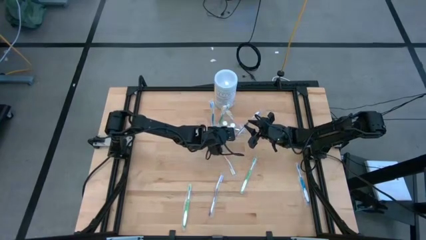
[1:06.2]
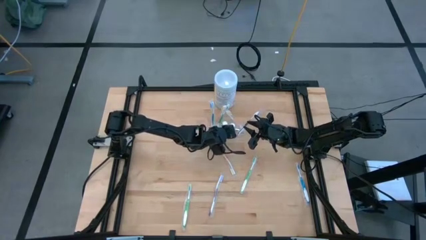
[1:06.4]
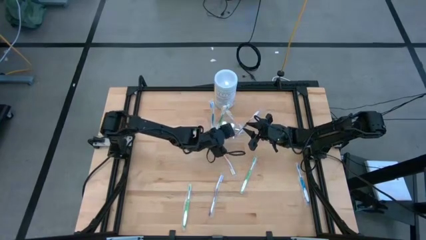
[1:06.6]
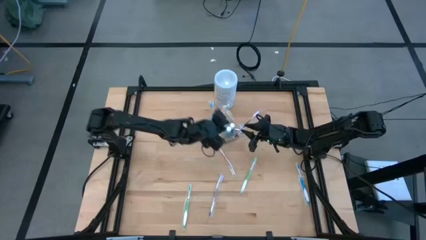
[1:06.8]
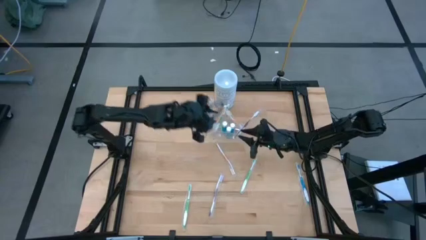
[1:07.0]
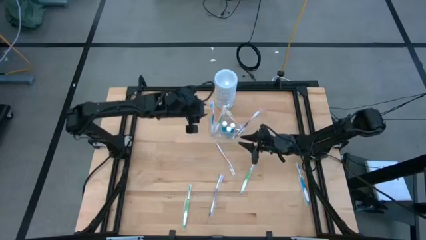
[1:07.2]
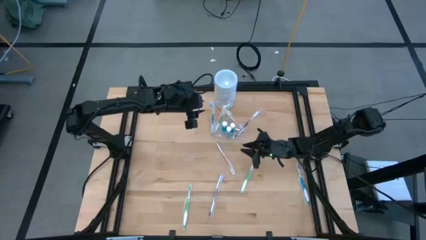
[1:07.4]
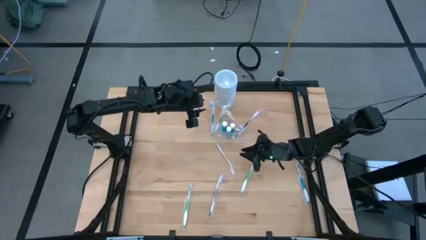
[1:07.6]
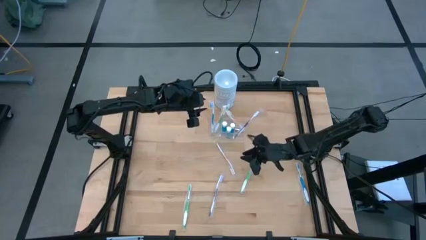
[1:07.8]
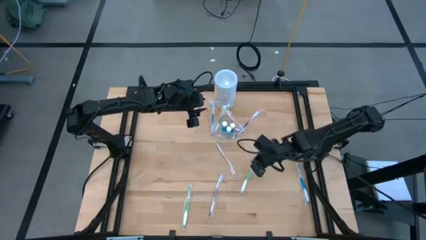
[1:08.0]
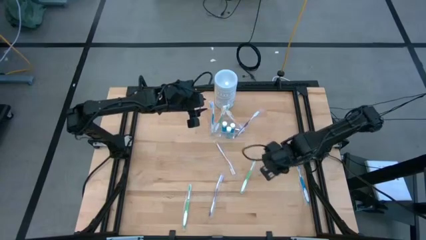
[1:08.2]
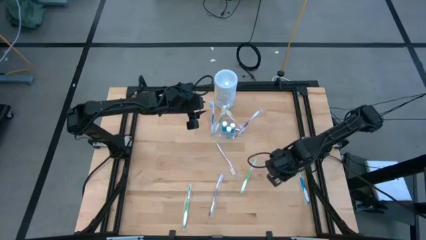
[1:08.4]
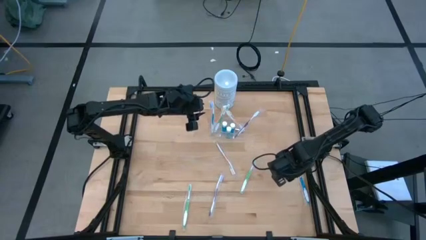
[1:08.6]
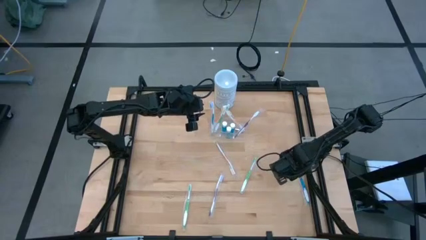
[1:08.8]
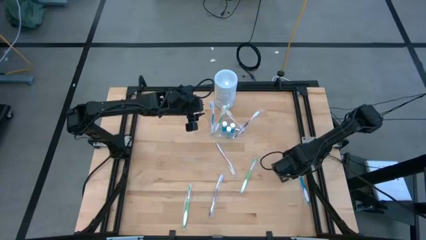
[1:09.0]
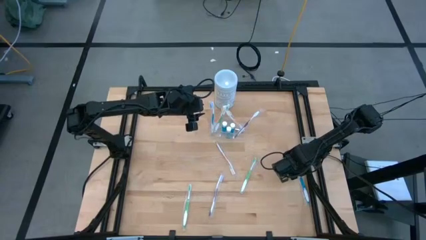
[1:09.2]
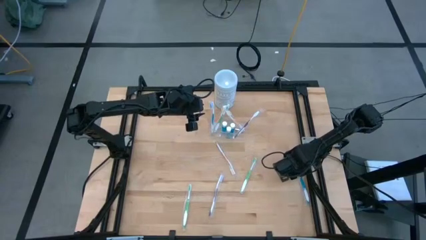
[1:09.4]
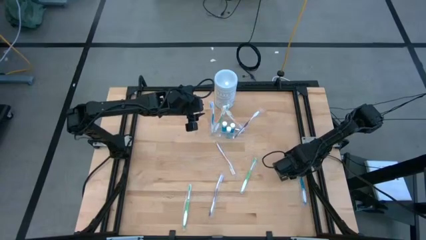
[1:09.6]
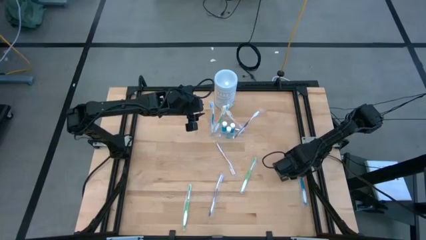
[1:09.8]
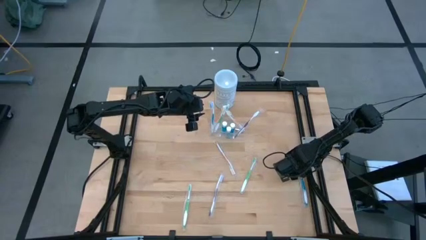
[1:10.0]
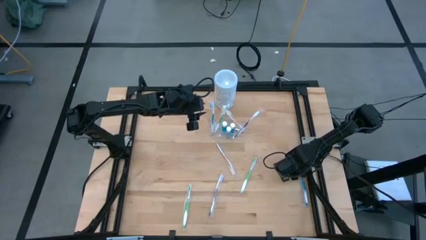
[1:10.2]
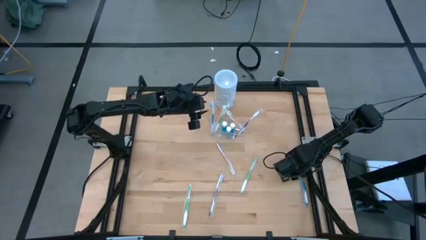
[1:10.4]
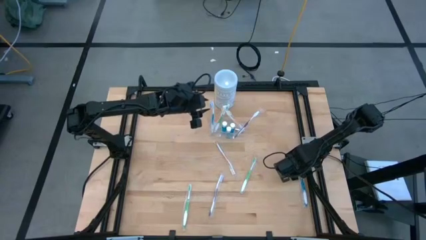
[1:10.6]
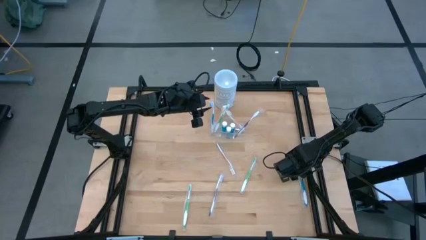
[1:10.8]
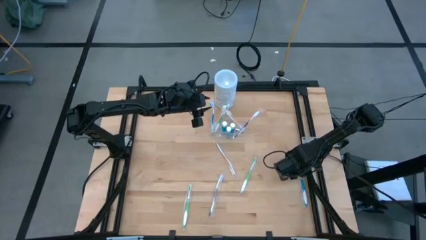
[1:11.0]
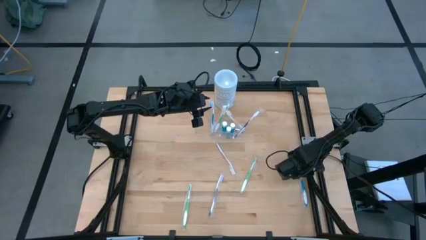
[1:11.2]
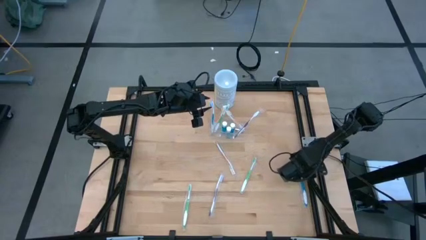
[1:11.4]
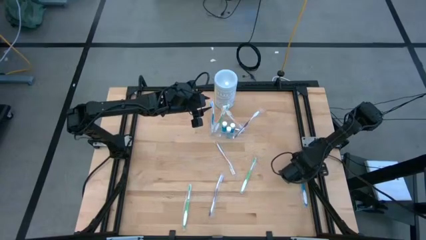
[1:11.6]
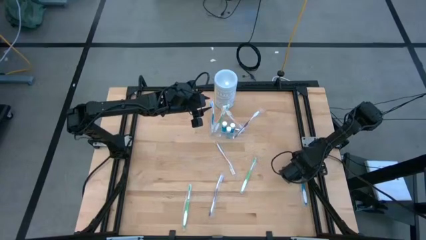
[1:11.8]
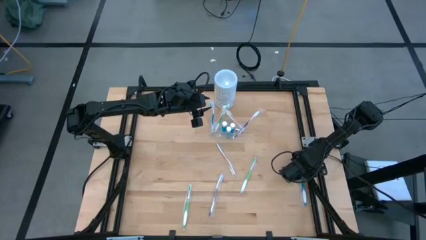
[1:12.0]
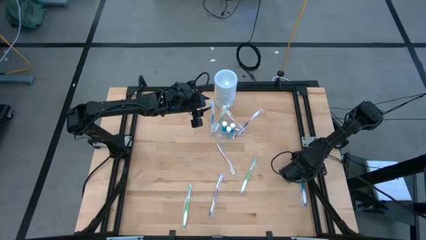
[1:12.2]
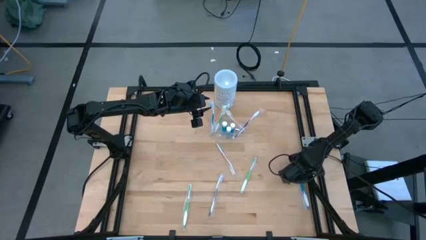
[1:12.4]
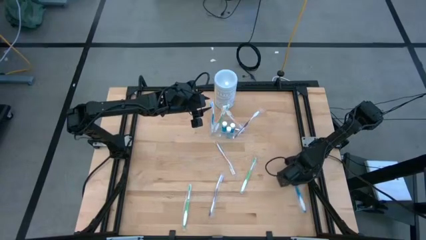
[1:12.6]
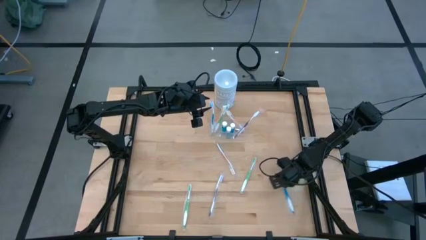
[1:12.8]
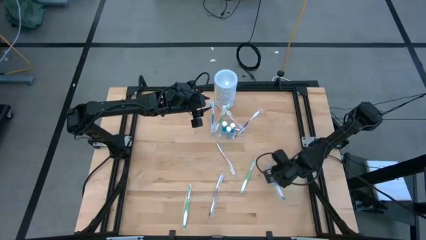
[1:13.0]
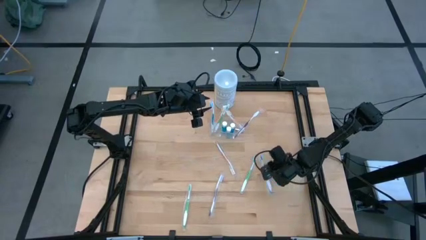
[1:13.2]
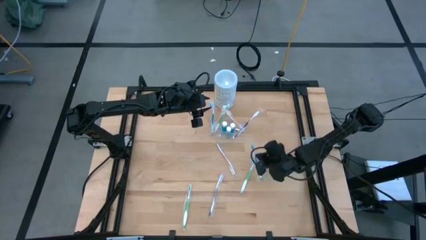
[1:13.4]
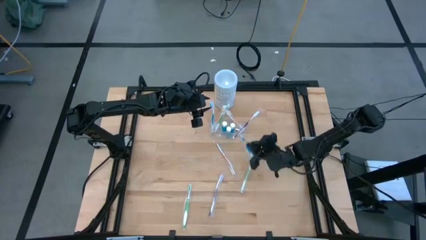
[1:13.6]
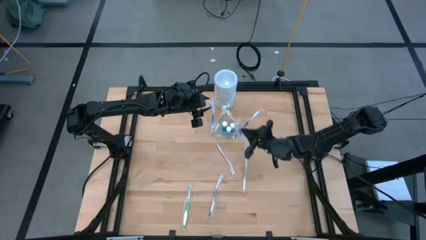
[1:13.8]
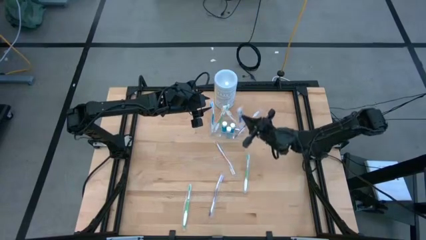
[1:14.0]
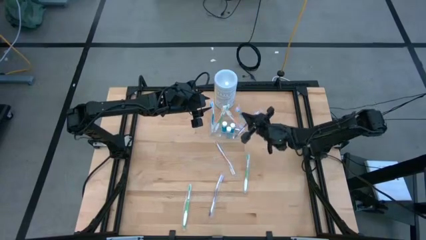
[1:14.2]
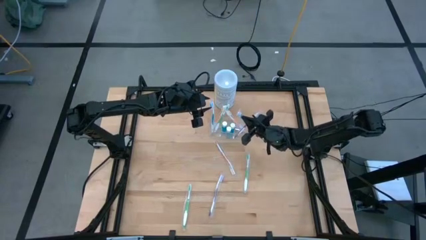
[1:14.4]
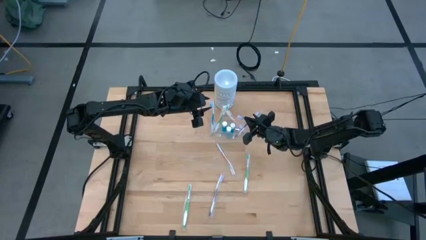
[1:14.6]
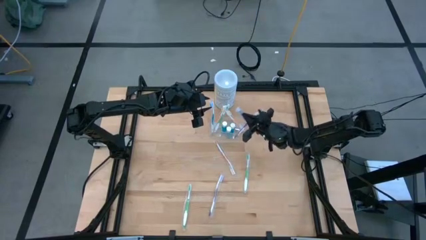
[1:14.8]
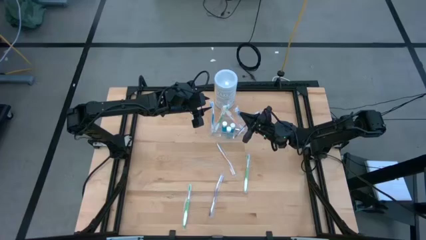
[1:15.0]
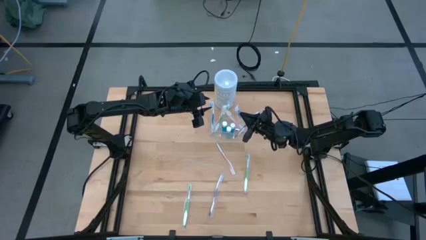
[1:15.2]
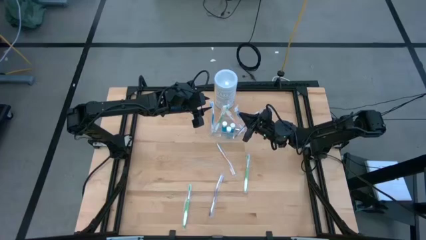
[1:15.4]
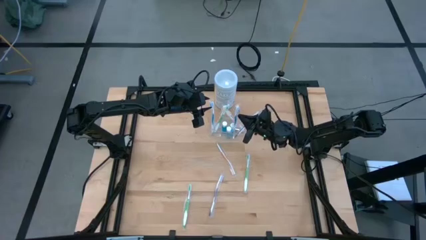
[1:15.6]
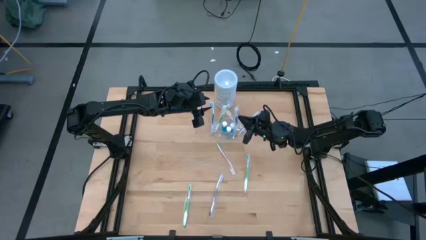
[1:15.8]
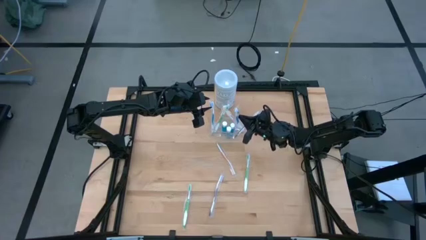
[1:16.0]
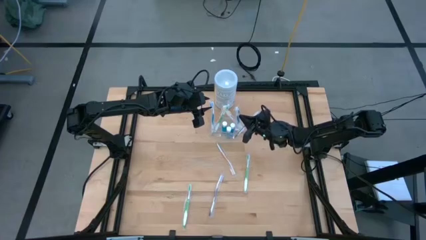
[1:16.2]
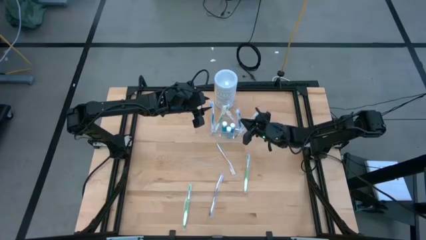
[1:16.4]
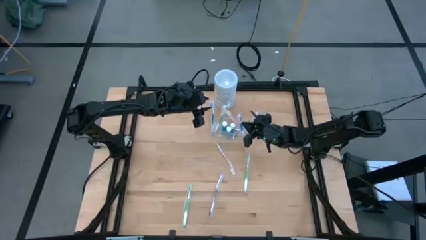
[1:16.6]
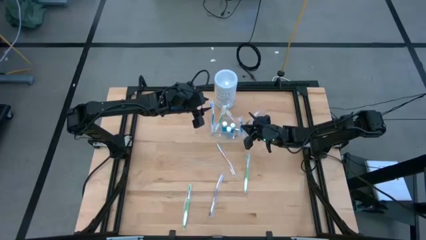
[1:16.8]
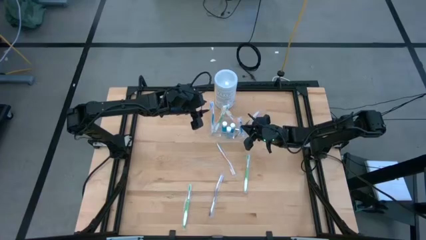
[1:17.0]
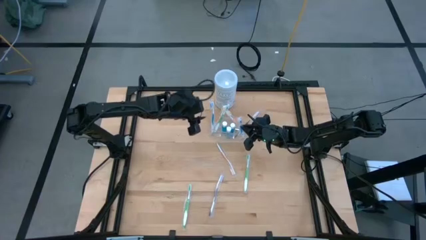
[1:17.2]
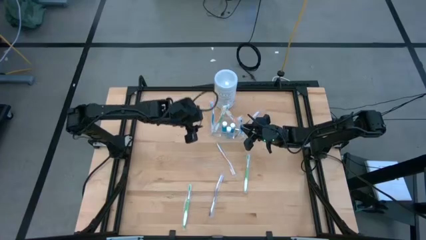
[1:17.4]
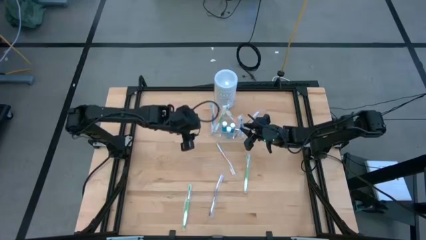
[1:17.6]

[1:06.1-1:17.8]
Task: Pick & Place toothbrushing station
Put the blue toothbrush into the transparent organizer

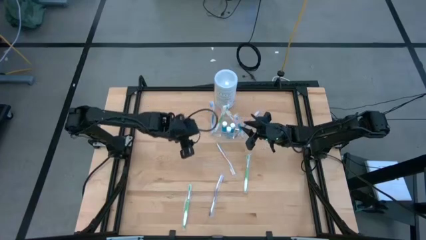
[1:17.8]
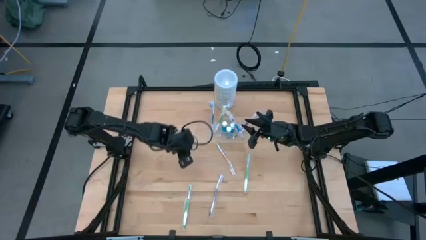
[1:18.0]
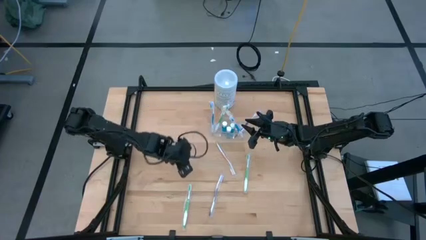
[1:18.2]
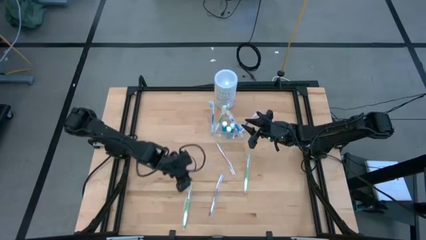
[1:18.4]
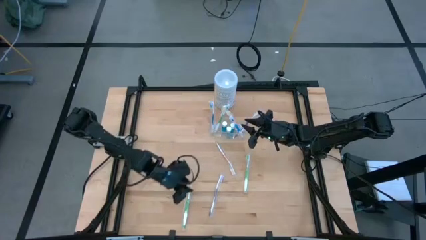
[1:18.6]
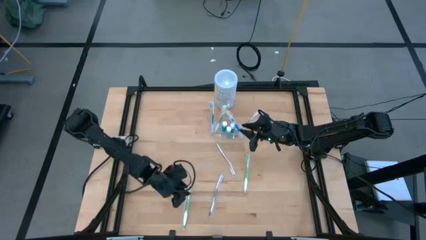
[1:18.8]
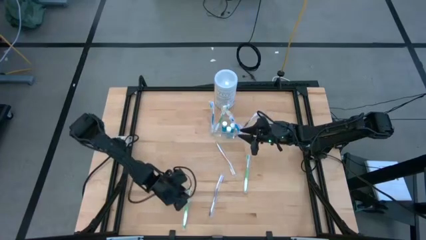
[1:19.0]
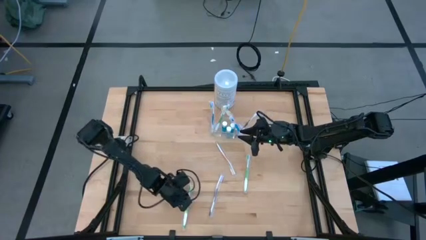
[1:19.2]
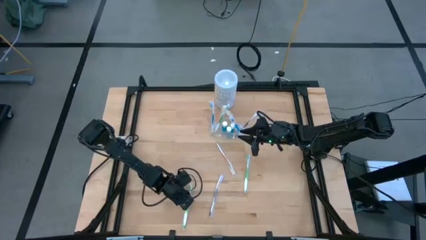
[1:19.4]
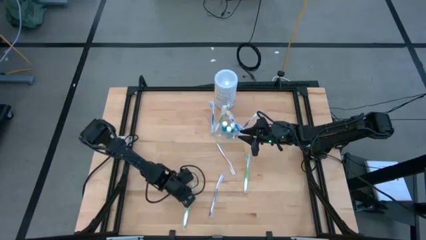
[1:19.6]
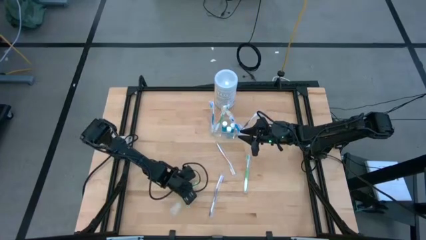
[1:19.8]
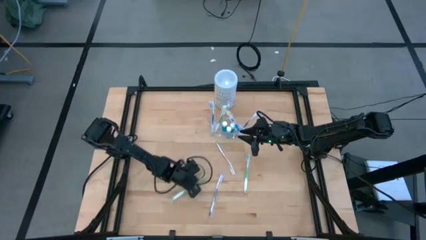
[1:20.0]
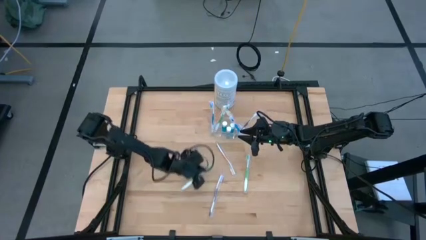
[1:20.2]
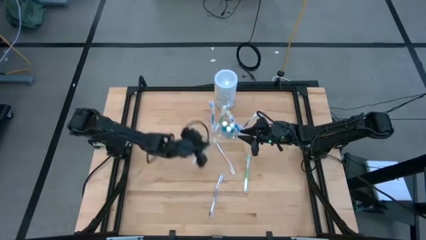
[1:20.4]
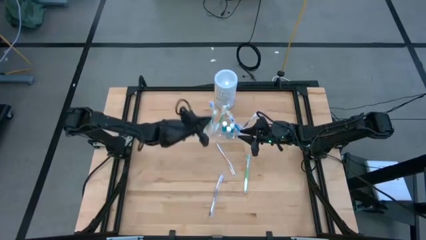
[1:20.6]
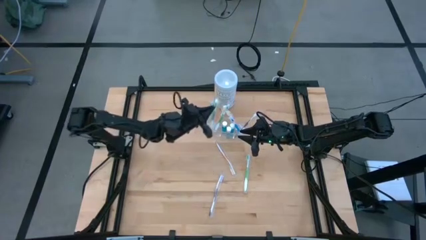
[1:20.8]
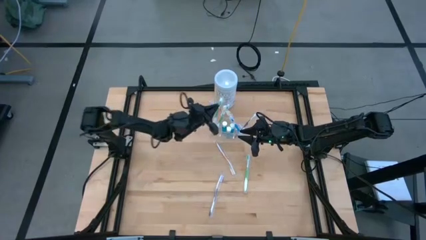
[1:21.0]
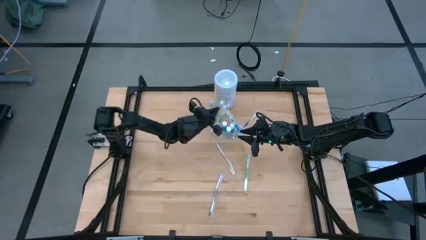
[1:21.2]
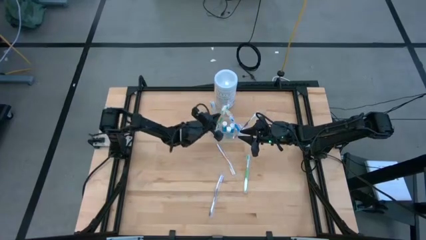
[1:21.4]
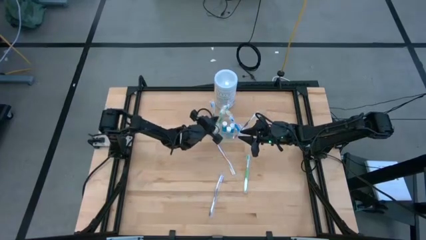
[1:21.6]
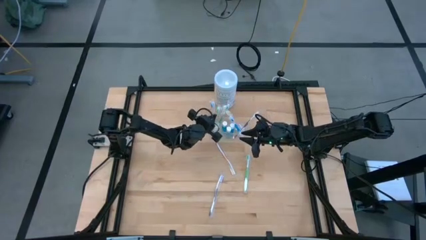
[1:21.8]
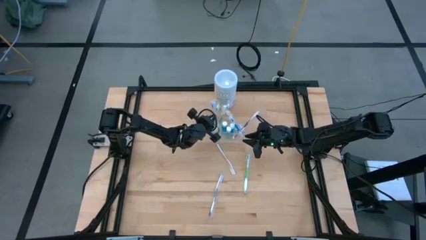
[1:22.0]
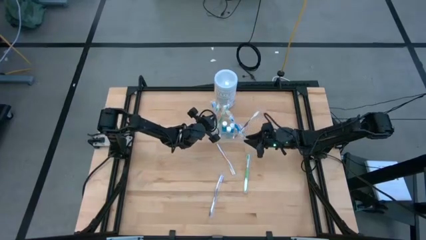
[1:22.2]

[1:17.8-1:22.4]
Put the bottom green toothbrush into the transparent organizer

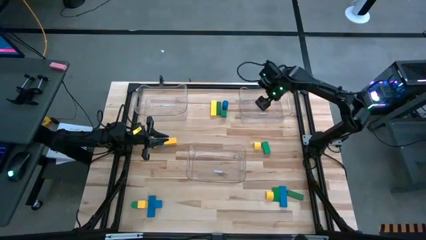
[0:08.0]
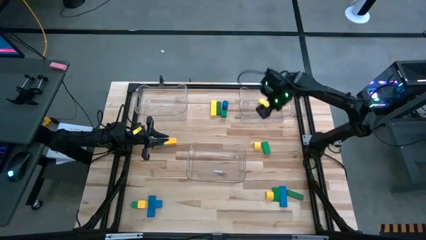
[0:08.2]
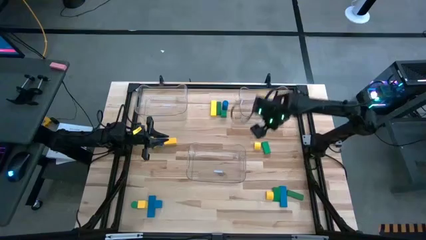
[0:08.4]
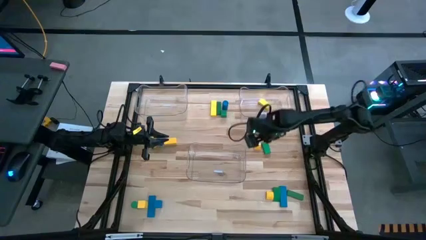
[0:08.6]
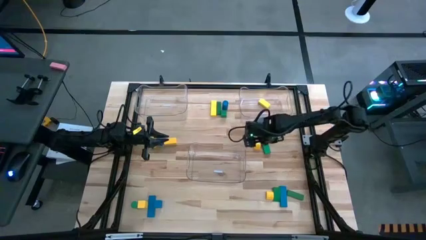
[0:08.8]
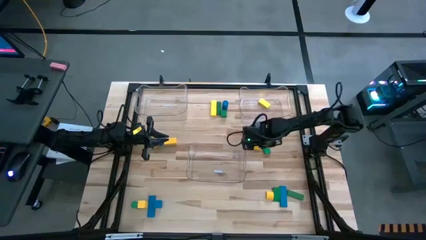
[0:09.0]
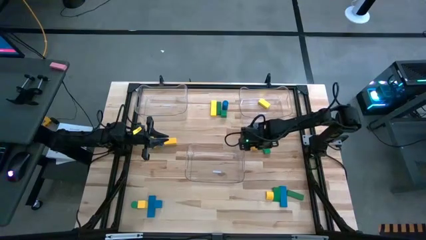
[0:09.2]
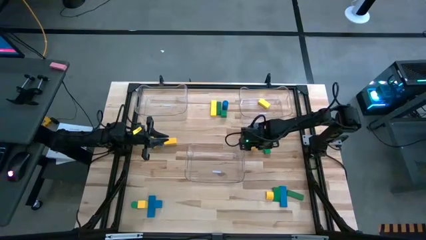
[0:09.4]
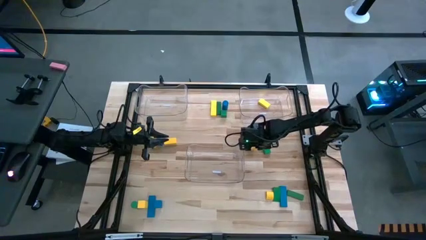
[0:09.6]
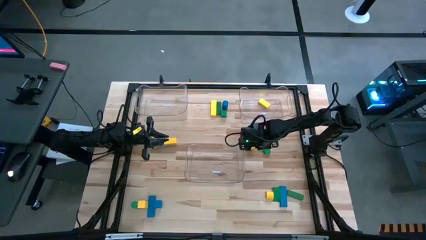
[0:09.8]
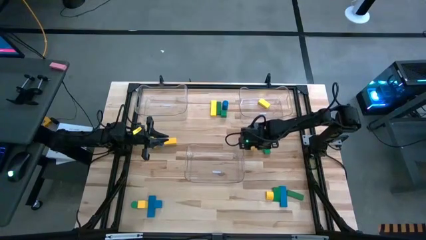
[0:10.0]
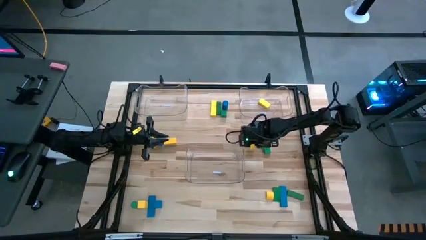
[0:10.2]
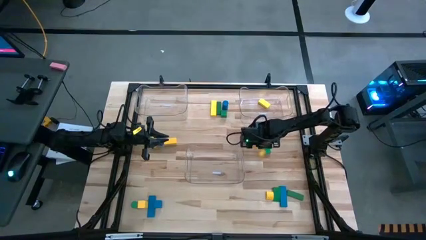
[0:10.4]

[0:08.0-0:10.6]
Task: Sort blocks
Put the yellow block into the right transparent bin
